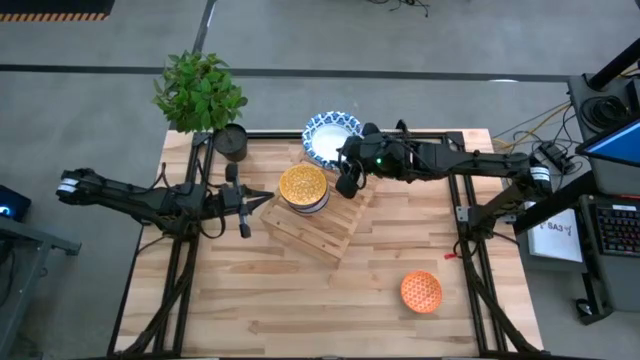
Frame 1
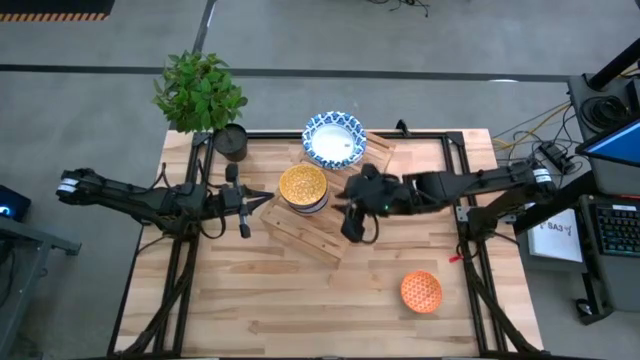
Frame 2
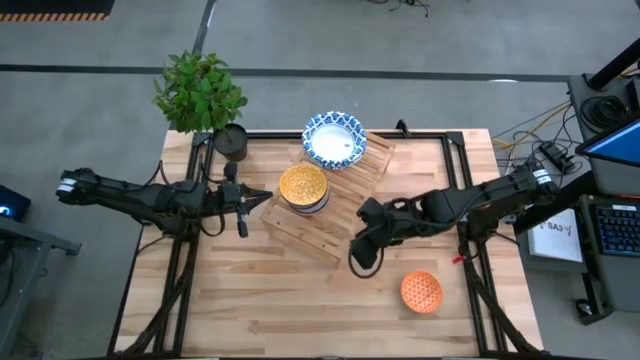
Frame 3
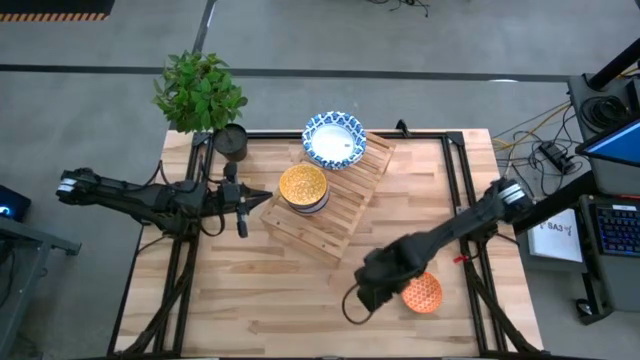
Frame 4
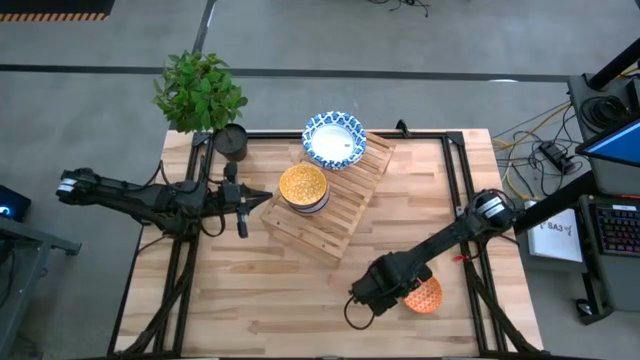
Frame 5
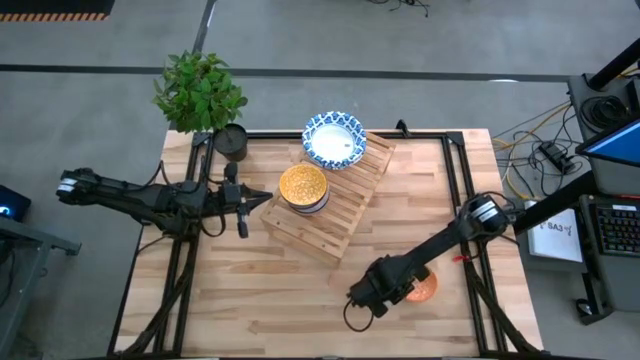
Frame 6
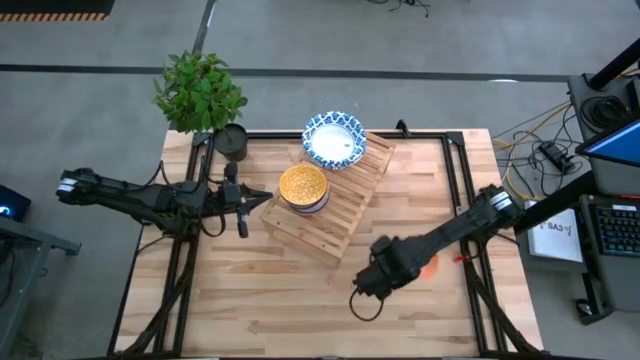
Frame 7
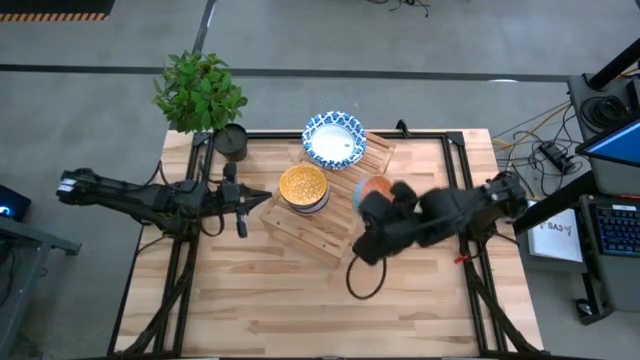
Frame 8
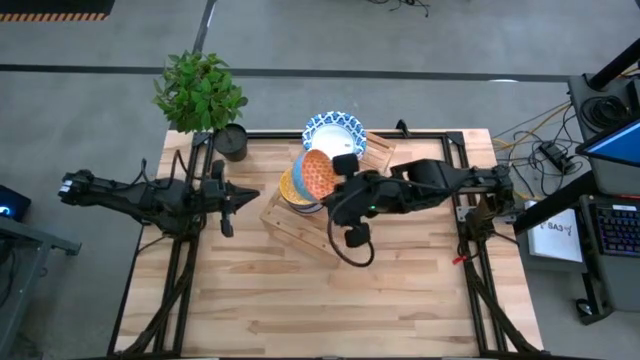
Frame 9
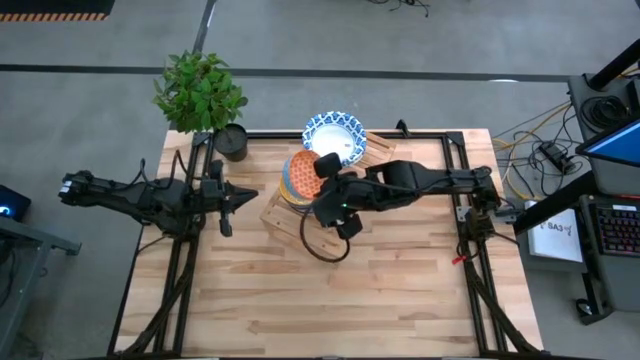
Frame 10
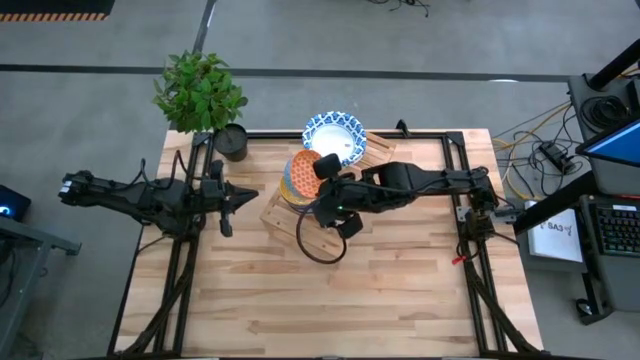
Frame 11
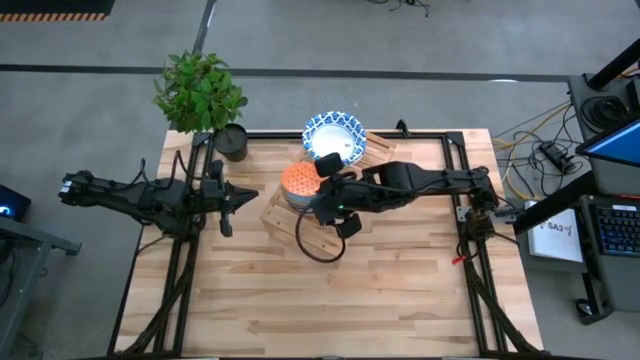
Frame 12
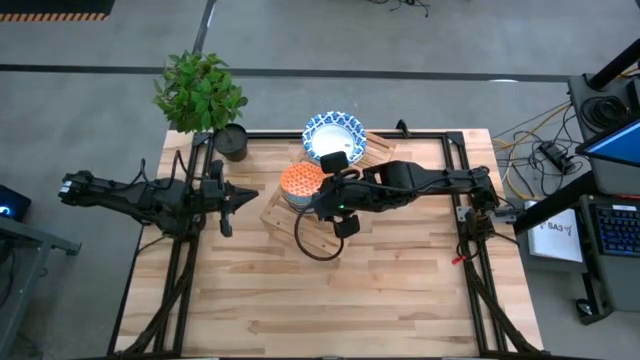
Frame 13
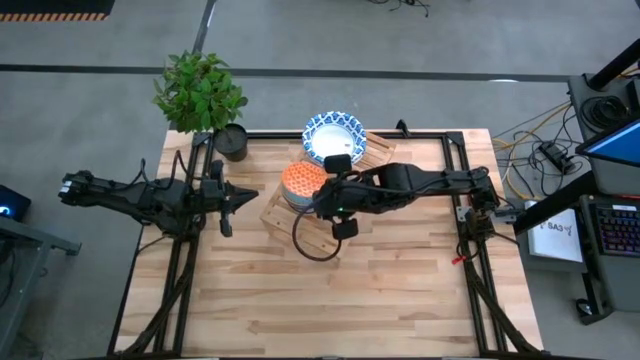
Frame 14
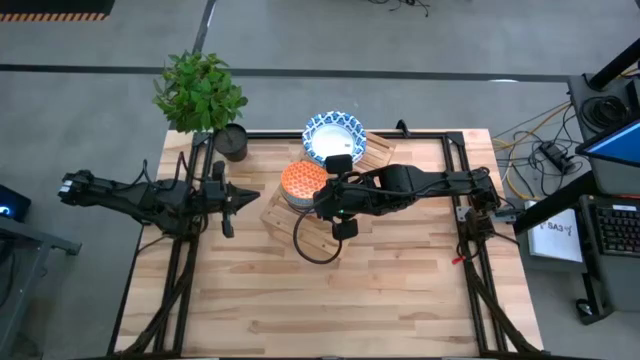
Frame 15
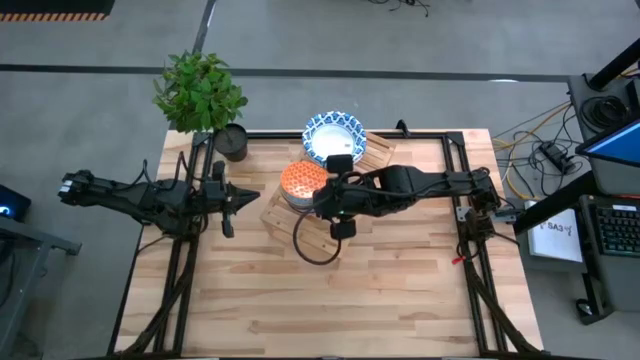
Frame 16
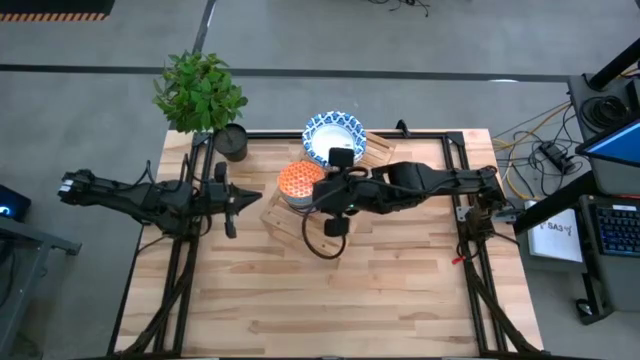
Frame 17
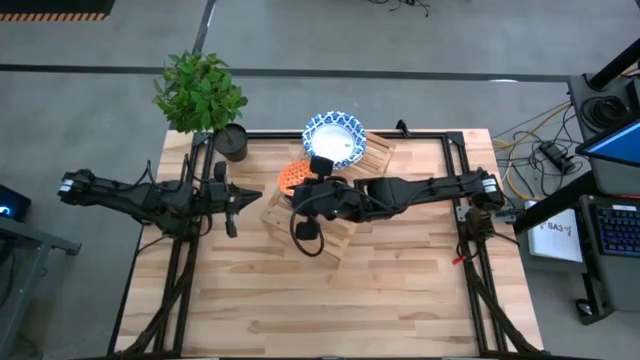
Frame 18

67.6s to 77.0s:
Task: Place and stack bowls onto a shelf
Stack the orange patterned bowl on top of the yellow patterned bowl on the shelf

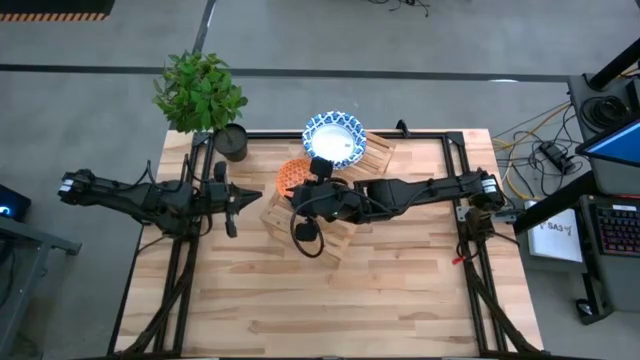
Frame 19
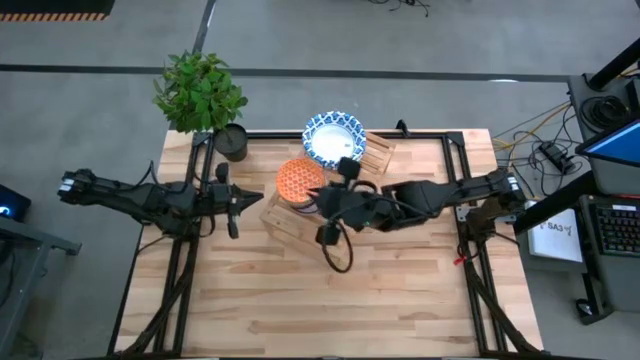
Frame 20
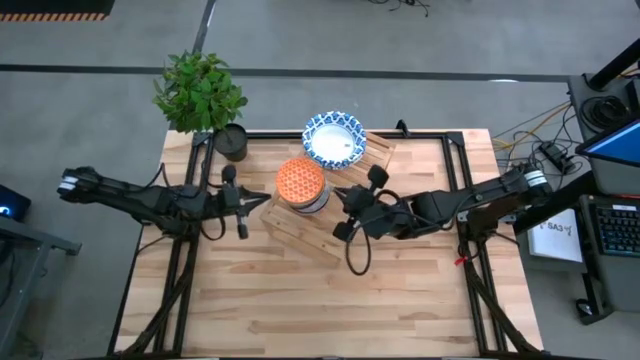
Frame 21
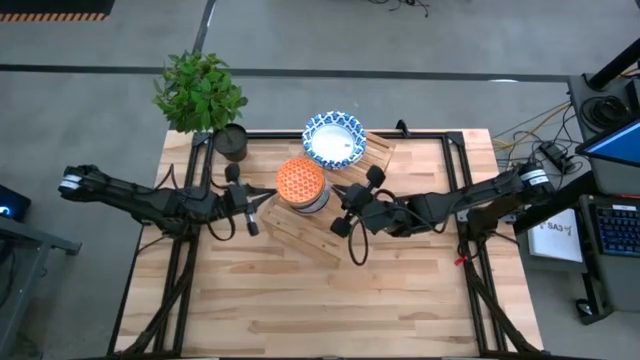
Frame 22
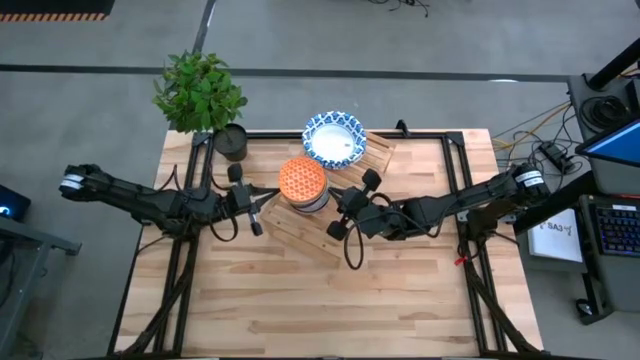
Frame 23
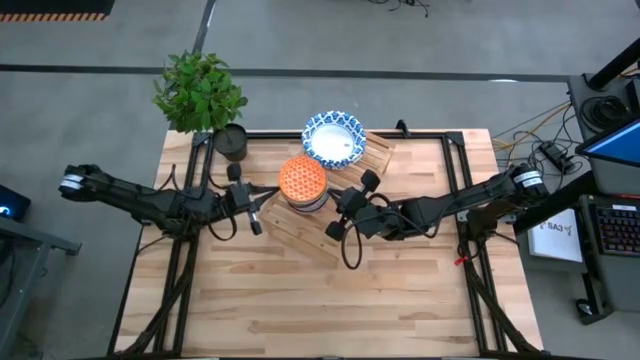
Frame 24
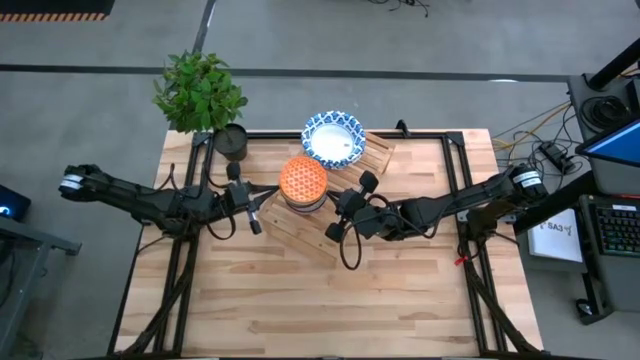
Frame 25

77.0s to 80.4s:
Adjust the stacked patterned bowls on the shelf

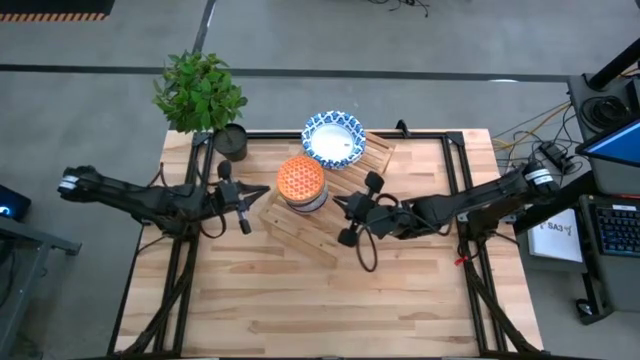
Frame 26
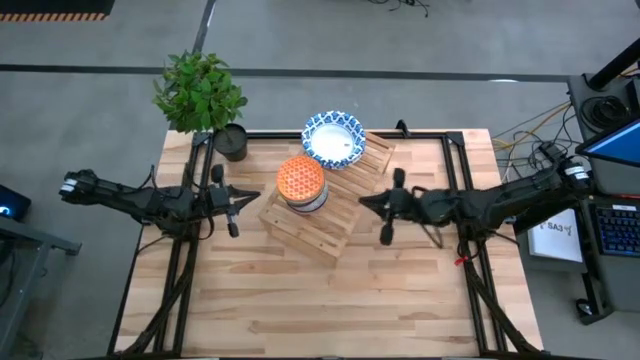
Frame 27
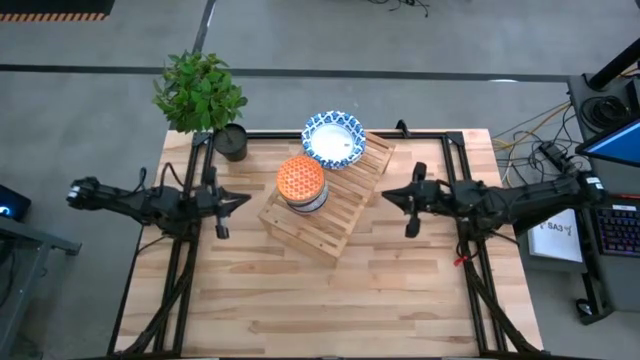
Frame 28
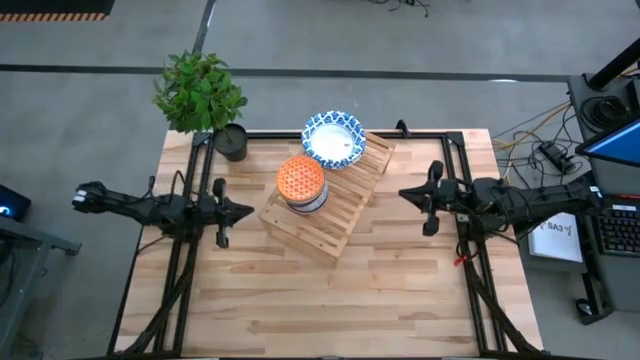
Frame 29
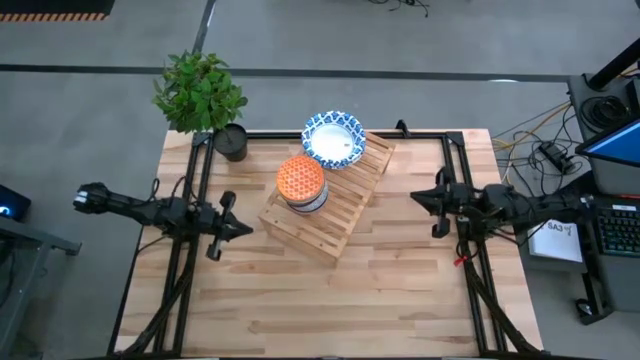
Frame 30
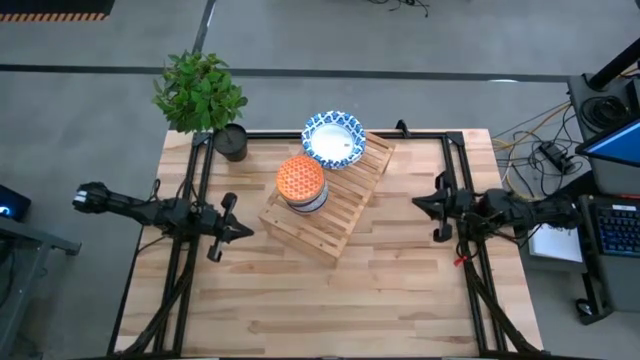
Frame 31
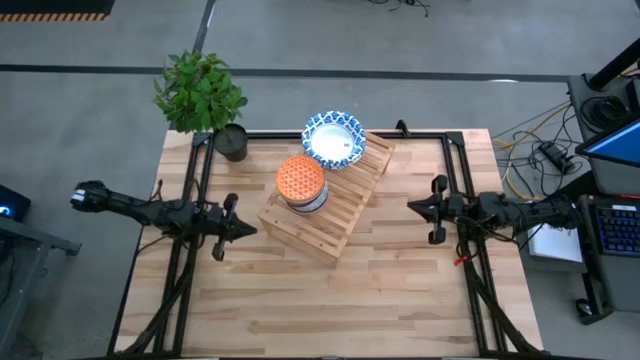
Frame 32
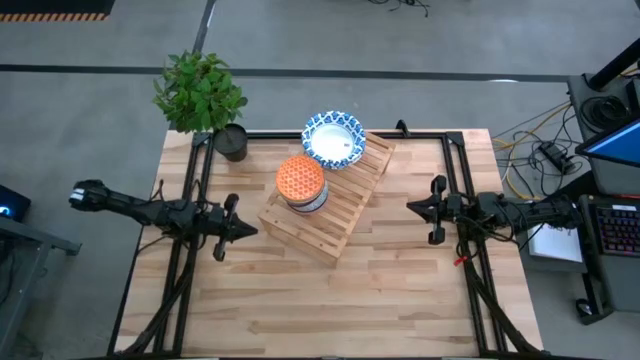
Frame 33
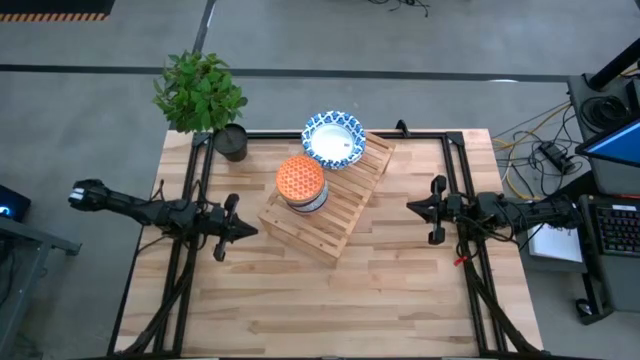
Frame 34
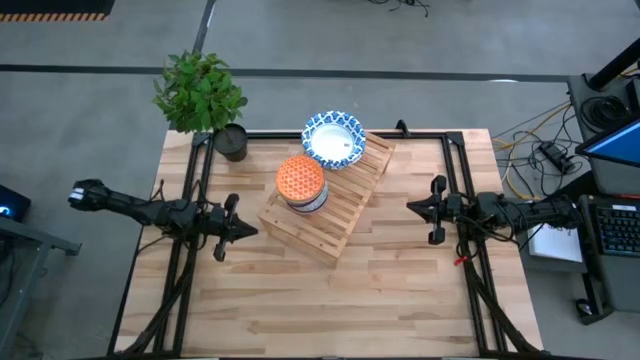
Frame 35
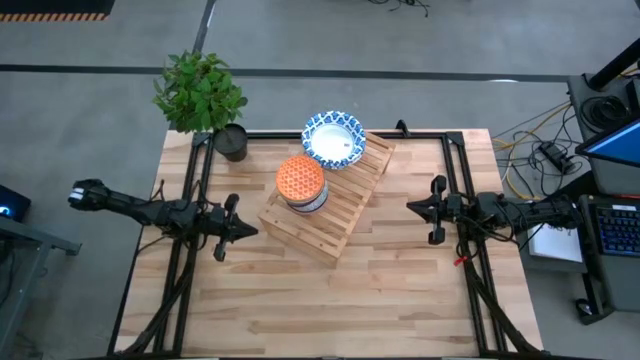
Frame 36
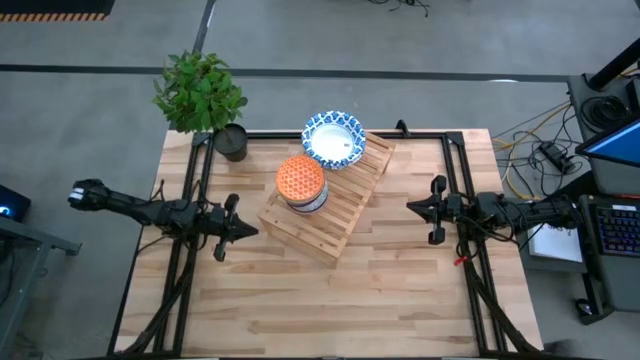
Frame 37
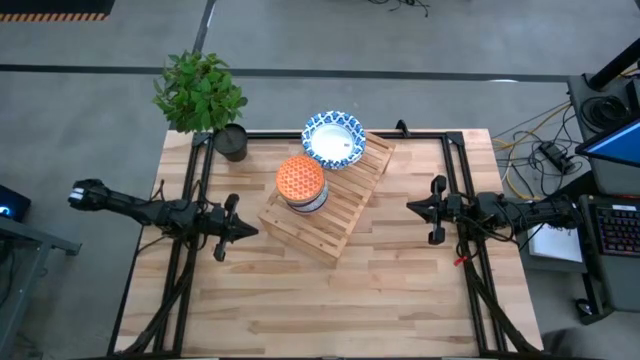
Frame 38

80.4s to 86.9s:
Return to Home Position
